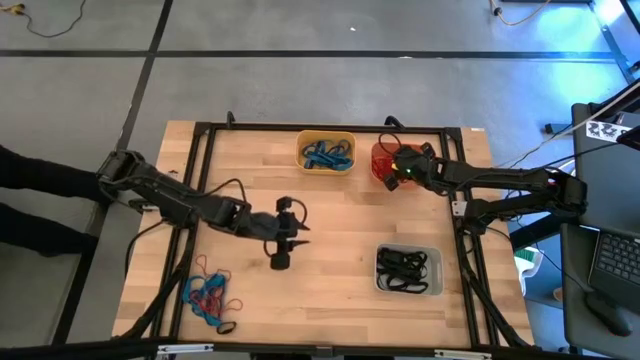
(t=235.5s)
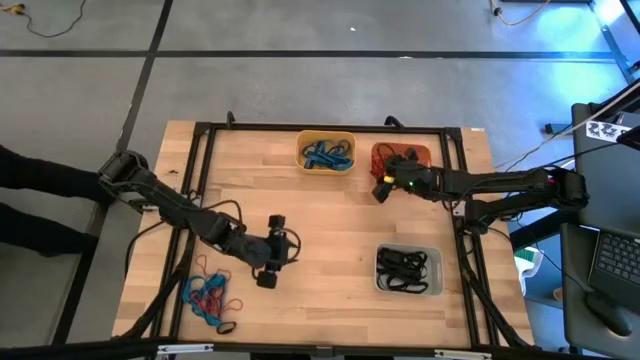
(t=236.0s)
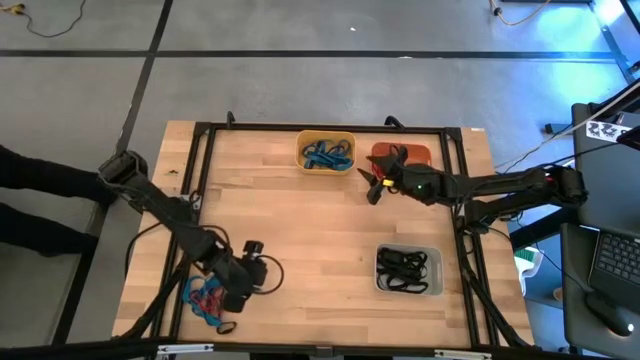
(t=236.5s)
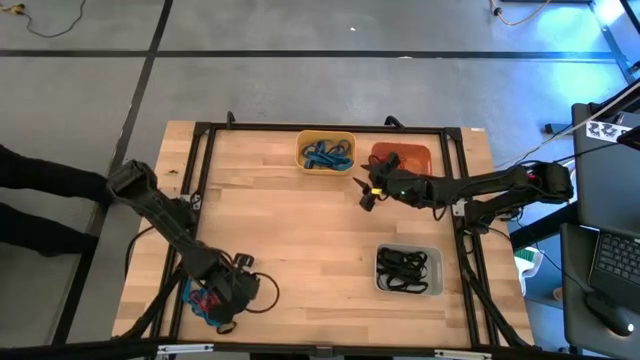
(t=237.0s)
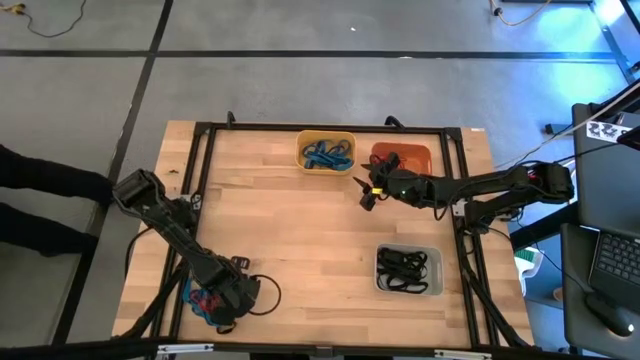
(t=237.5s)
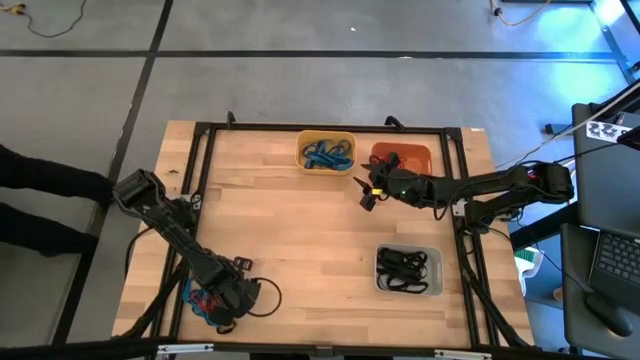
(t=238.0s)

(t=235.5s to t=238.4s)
Task: Sort rubber bands into baskets
Put the red rubber band into the orange bin

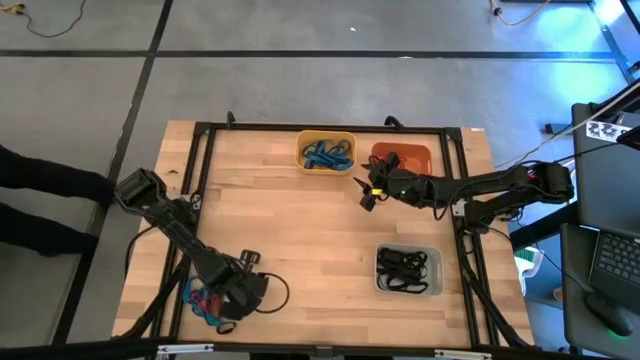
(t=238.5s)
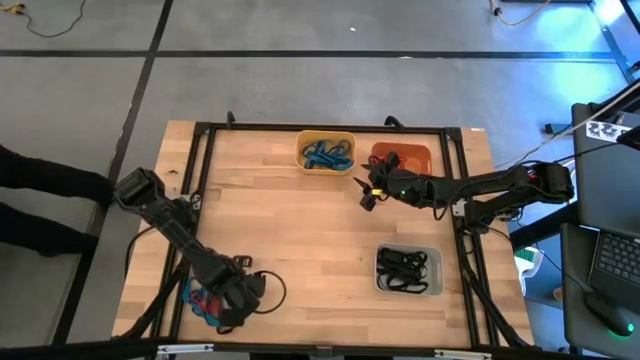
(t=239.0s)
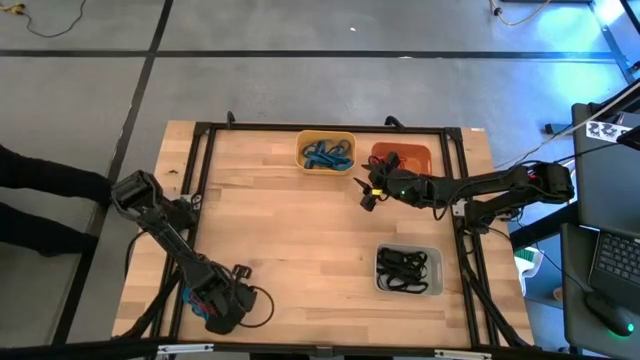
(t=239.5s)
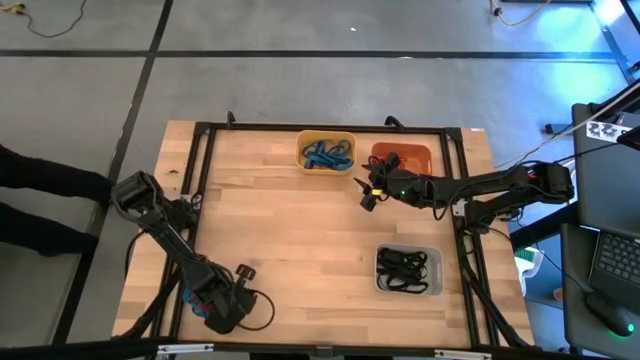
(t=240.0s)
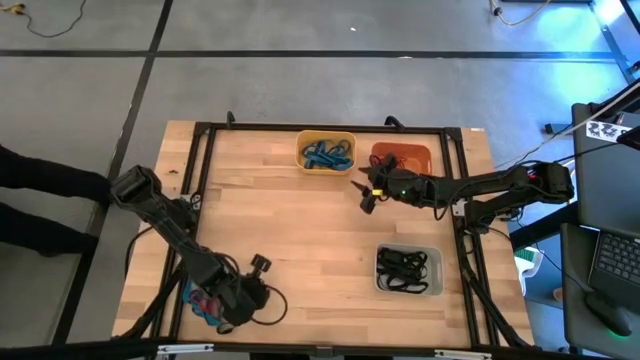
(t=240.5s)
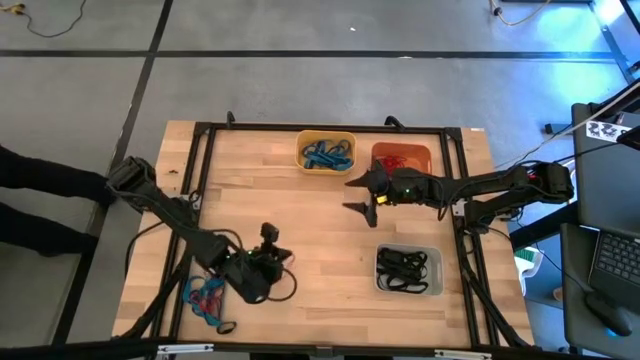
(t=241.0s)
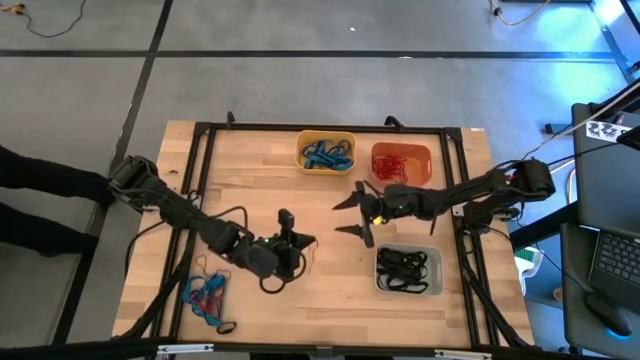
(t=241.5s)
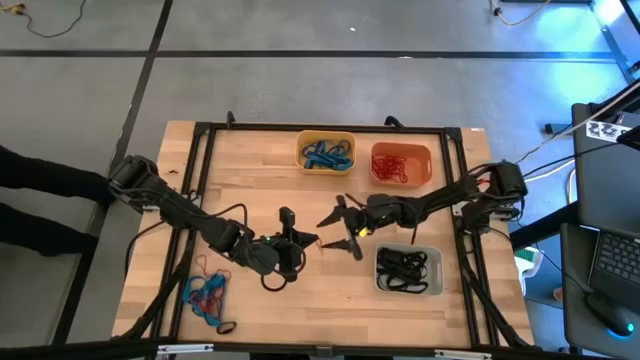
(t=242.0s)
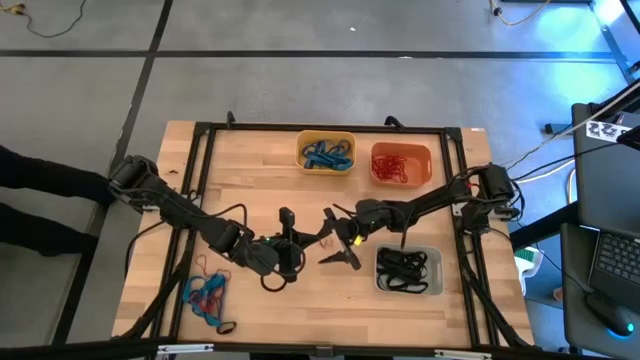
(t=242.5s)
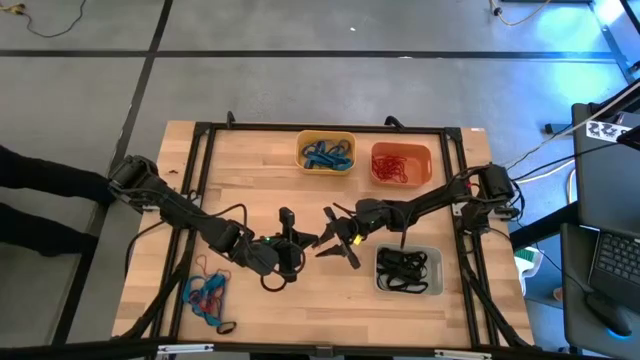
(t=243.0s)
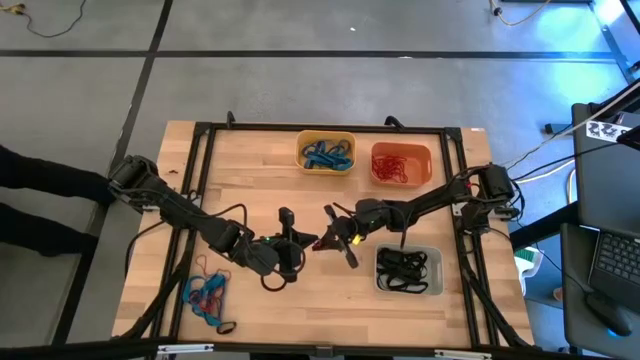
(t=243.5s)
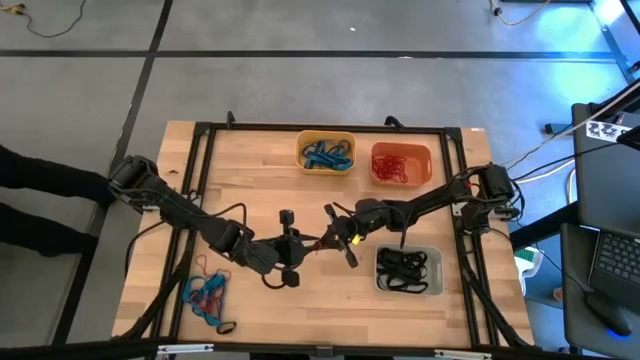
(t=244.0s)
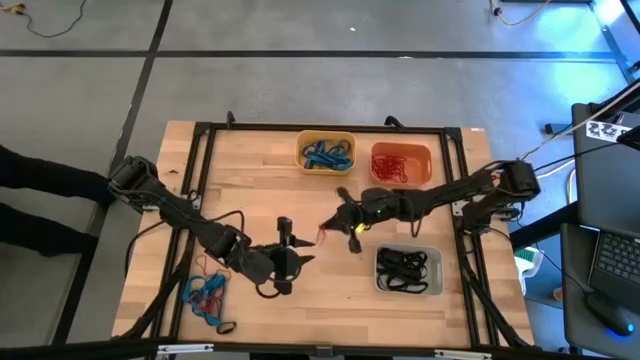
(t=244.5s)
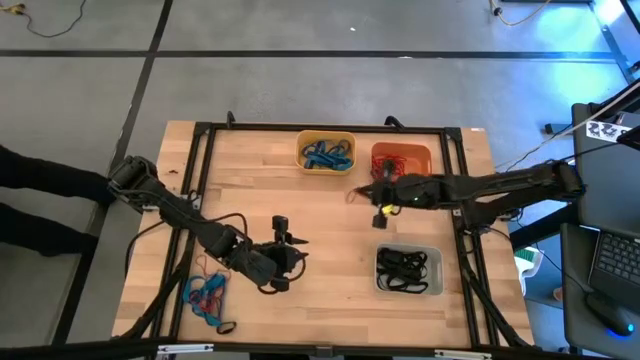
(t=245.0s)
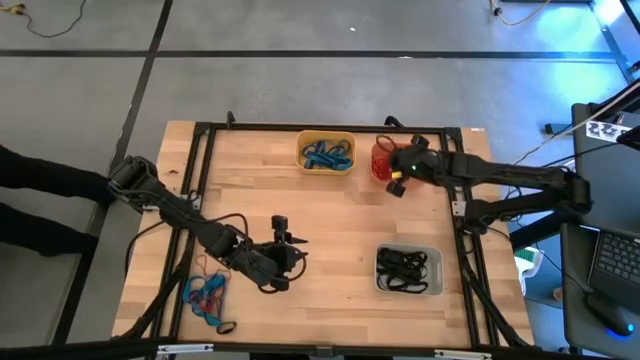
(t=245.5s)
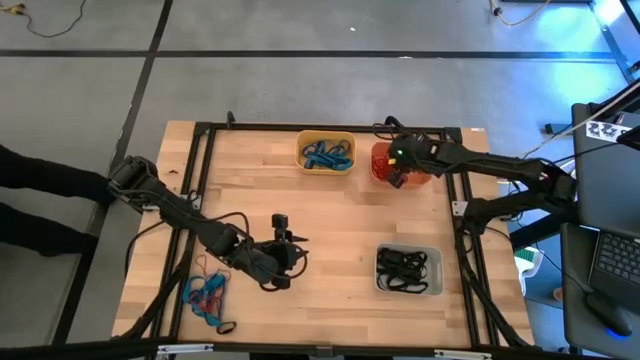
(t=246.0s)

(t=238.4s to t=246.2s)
Put the red rubber band into the orange bin

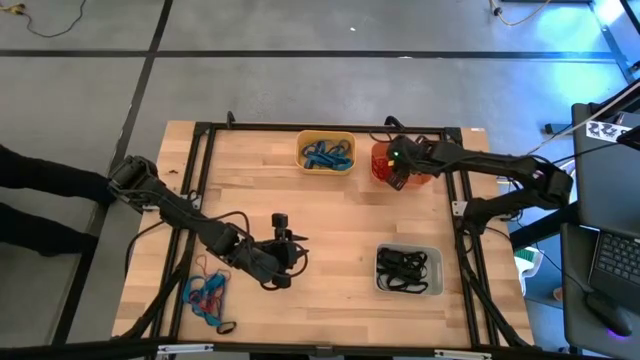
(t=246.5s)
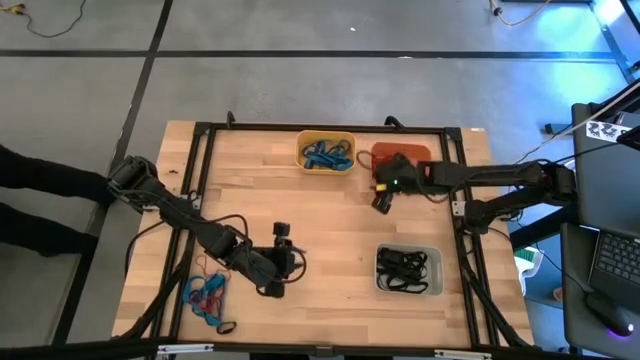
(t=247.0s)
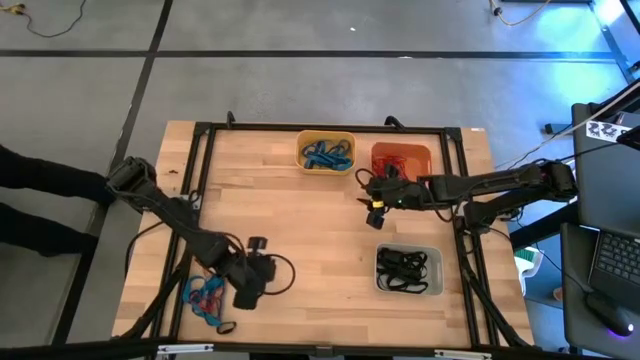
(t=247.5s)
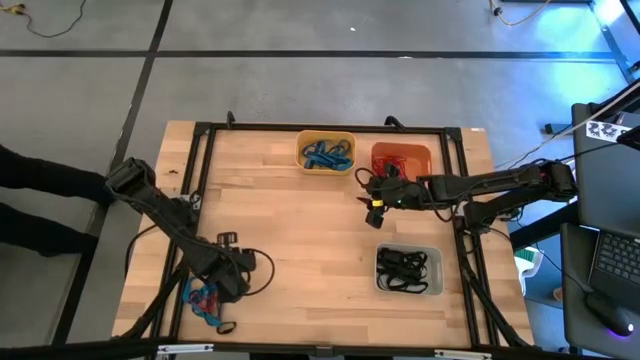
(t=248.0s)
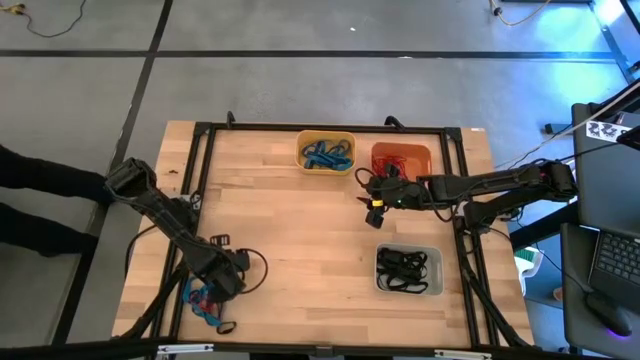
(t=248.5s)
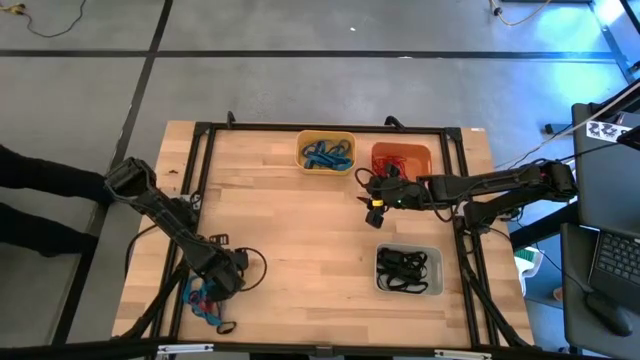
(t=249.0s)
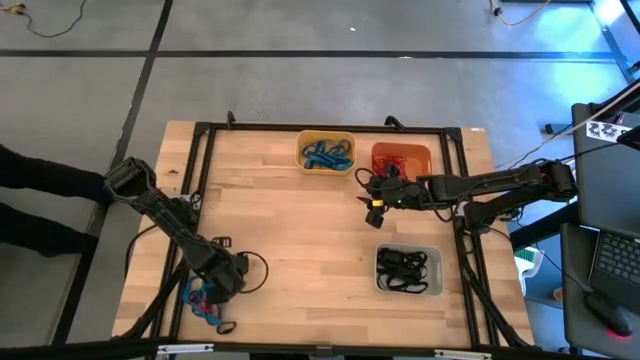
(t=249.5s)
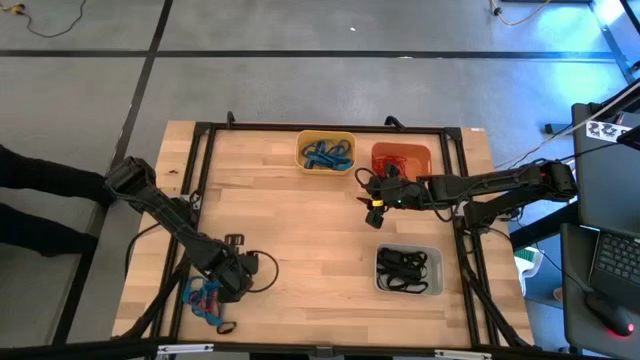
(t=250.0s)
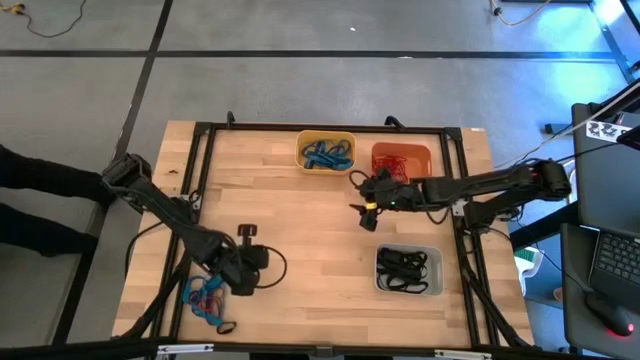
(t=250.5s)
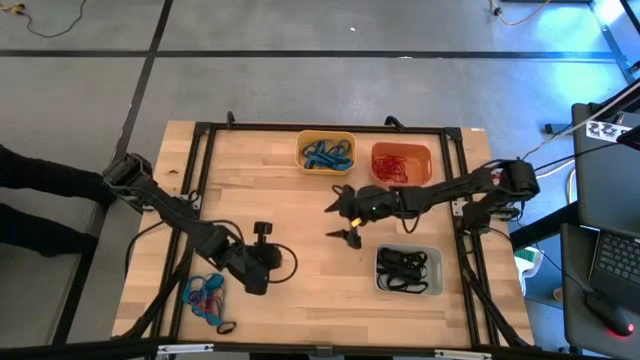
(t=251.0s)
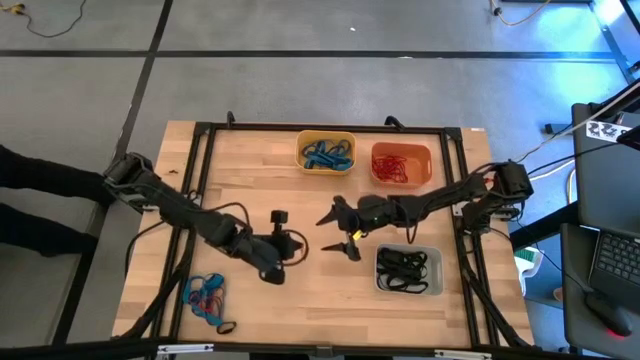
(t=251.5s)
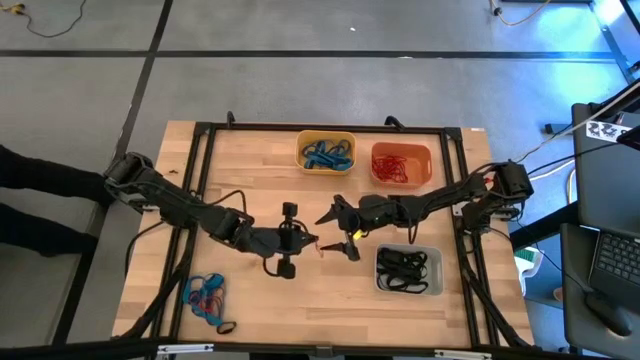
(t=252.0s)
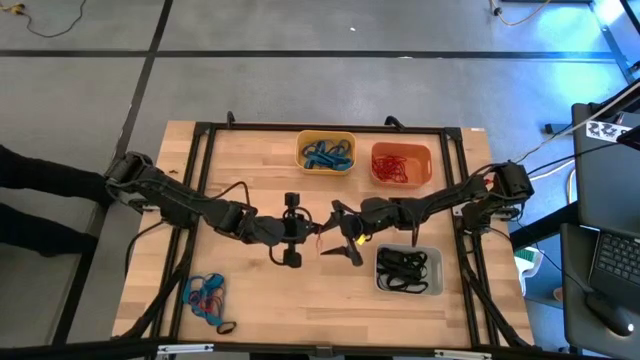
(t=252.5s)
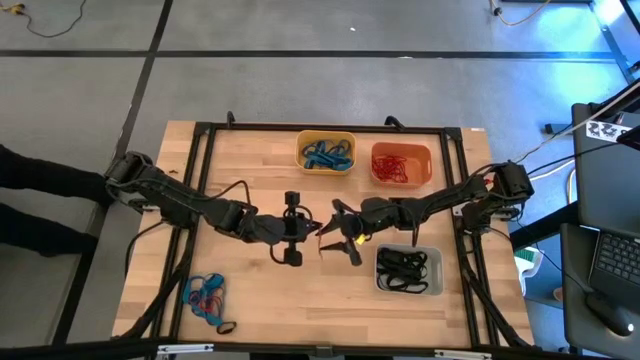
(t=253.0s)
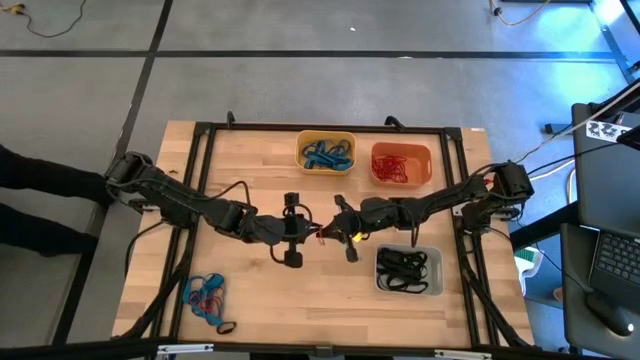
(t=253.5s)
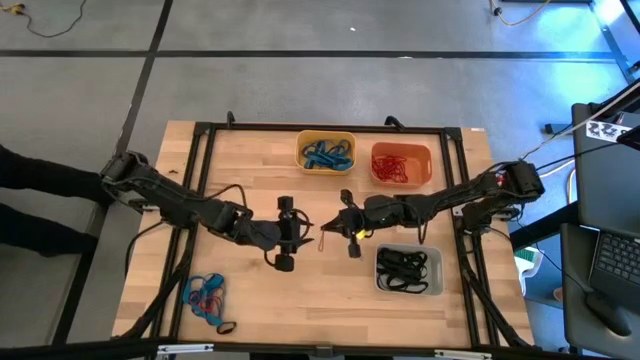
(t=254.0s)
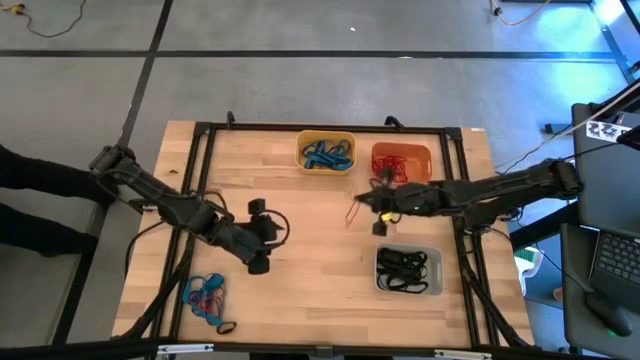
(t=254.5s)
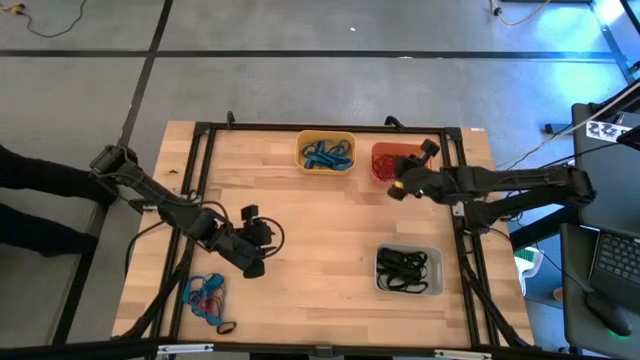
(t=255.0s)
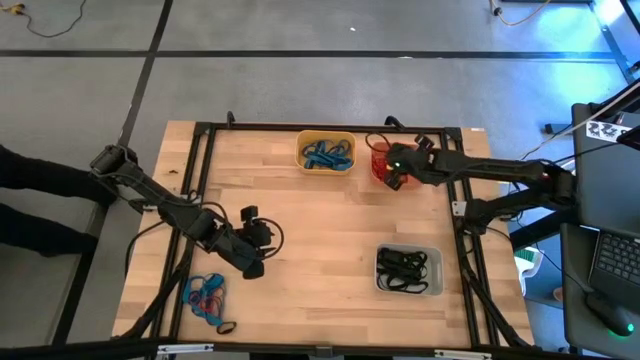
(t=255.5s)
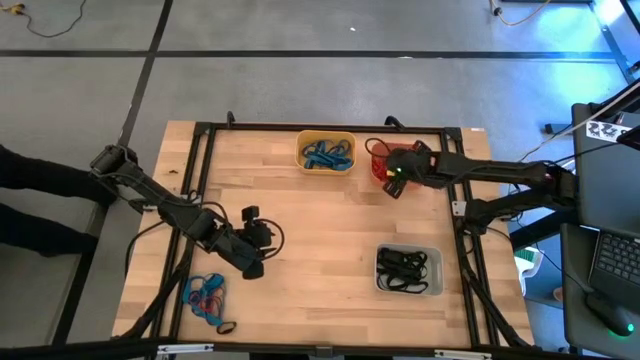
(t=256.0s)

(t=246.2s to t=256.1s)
Put the red rubber band into the orange bin
